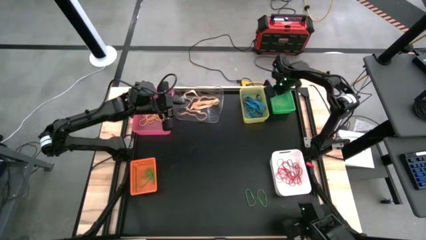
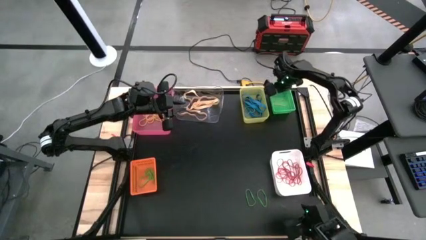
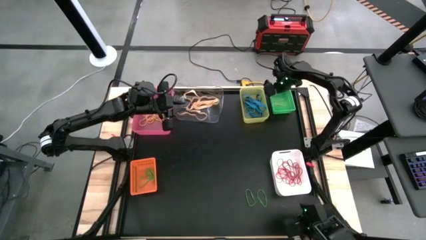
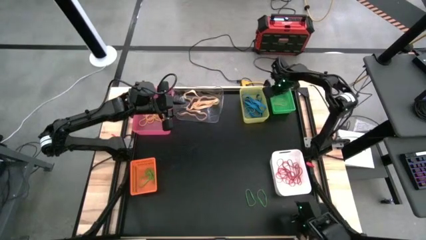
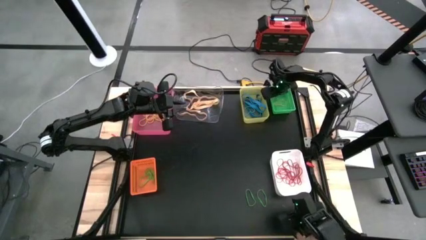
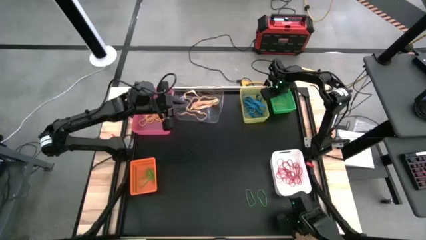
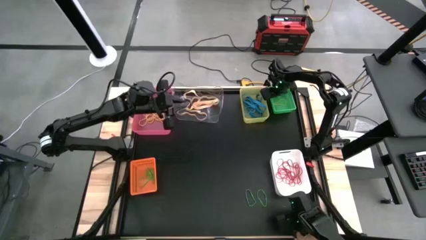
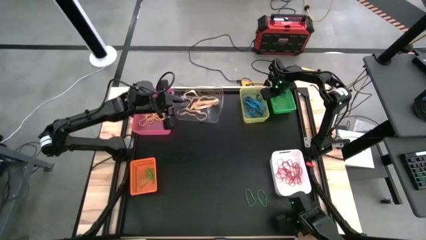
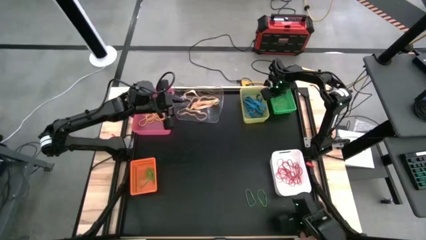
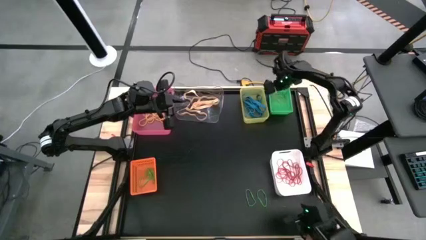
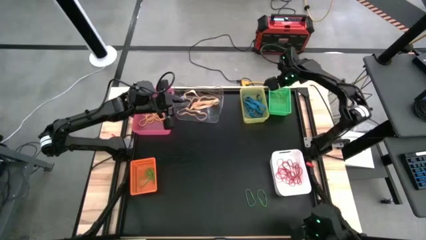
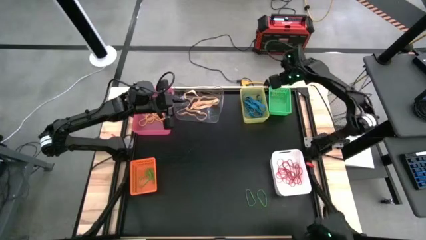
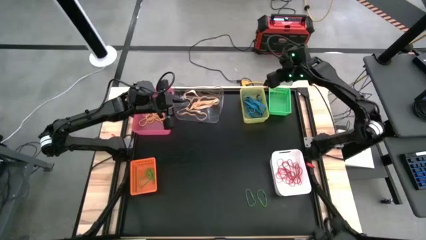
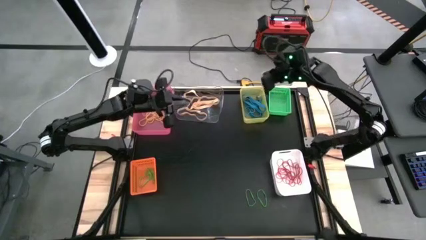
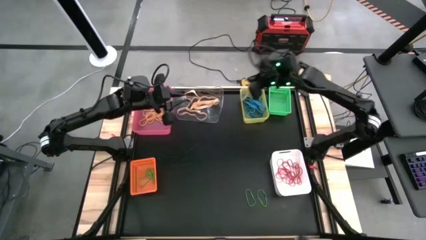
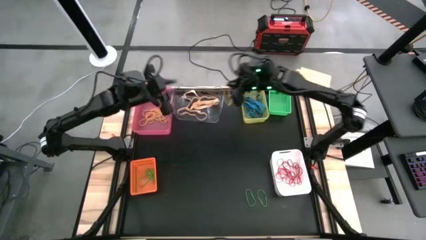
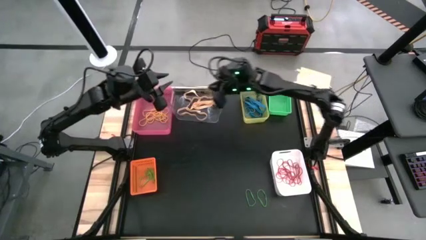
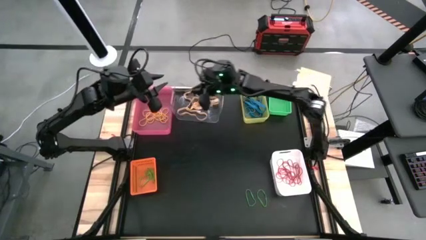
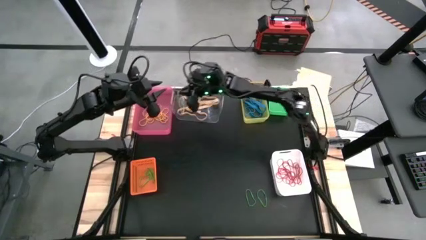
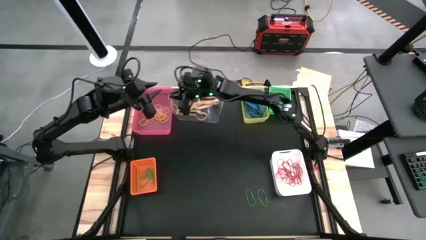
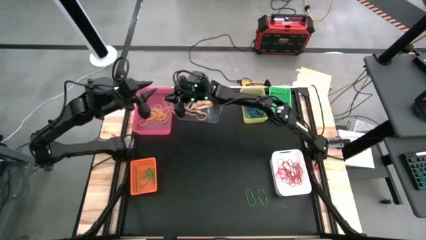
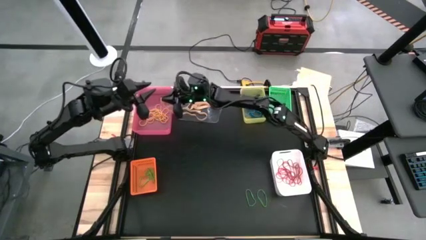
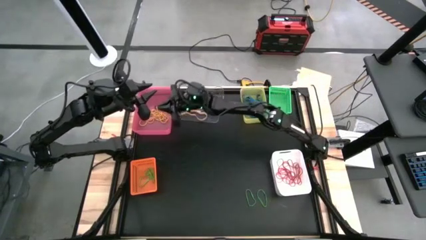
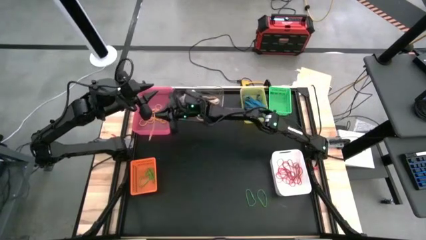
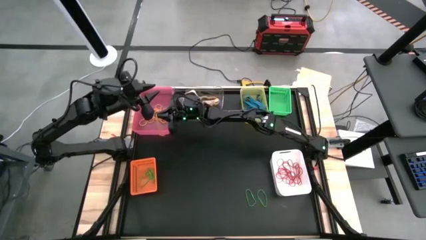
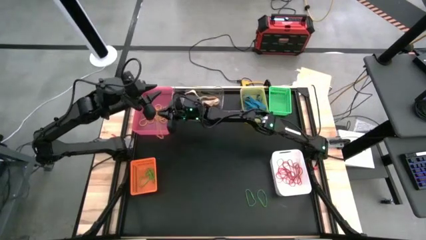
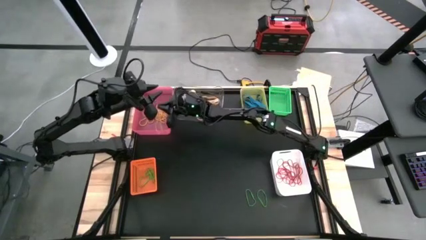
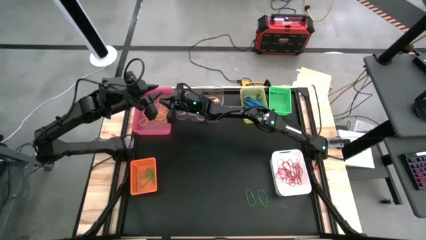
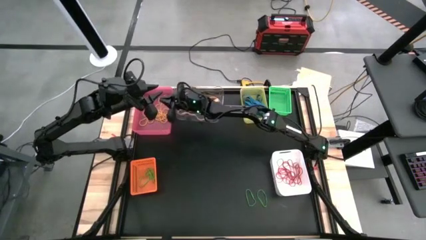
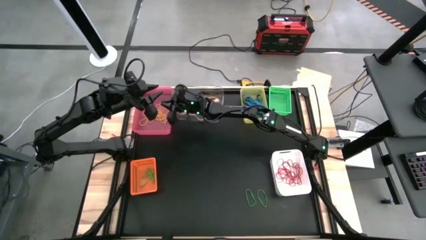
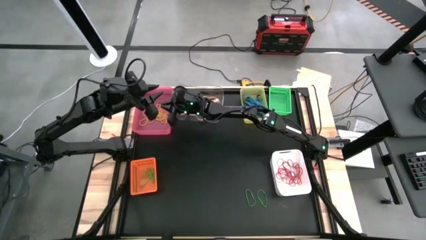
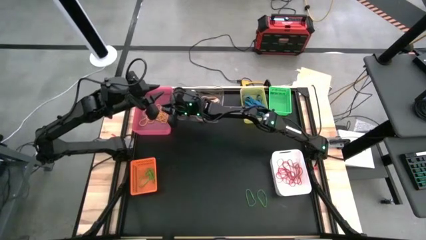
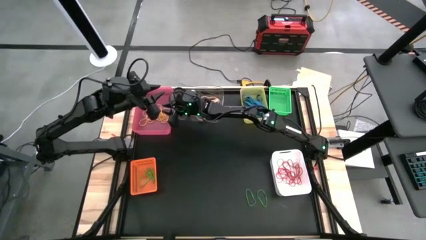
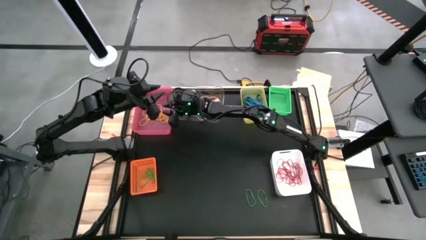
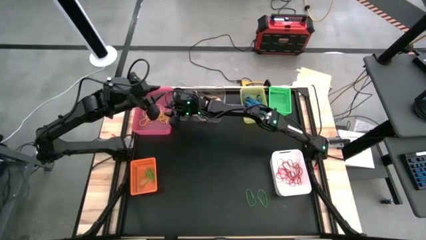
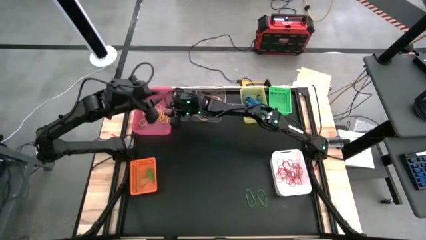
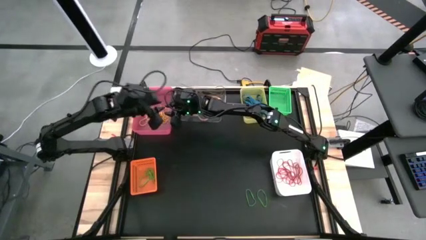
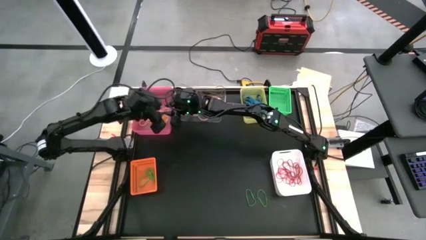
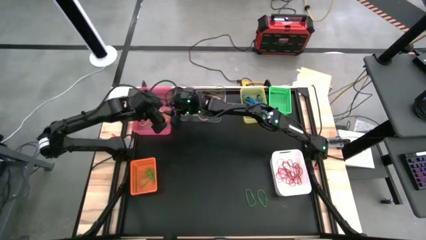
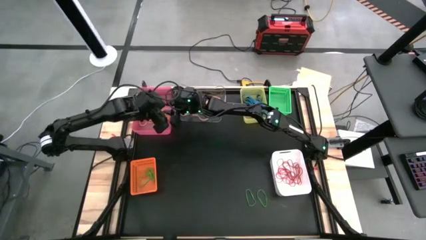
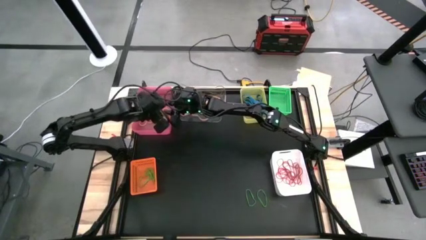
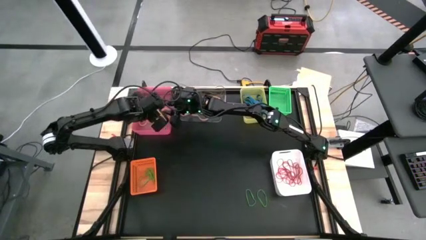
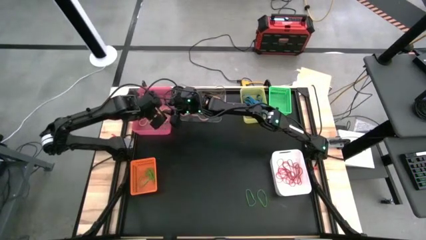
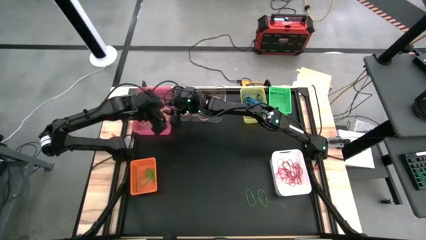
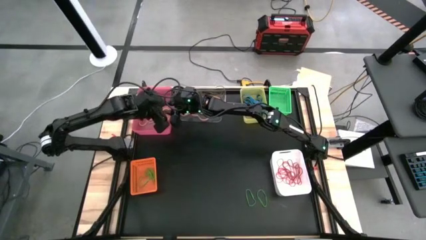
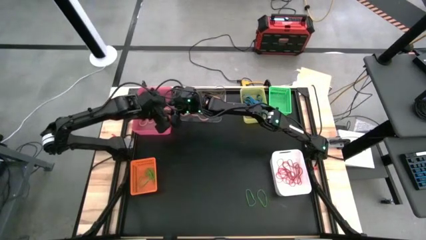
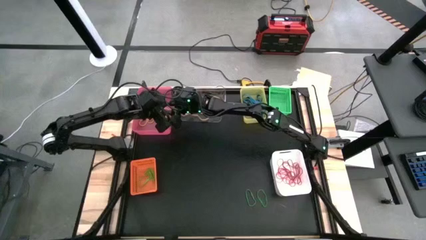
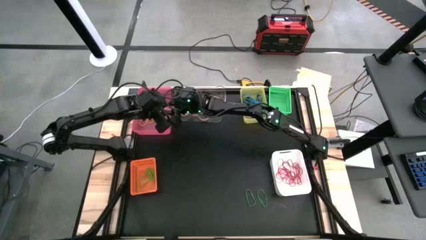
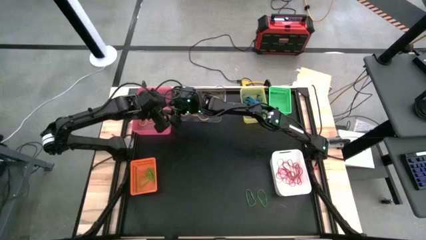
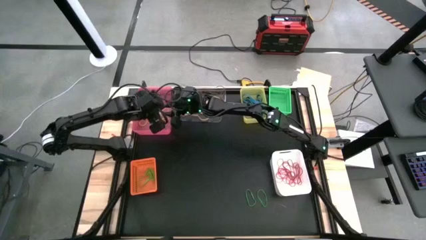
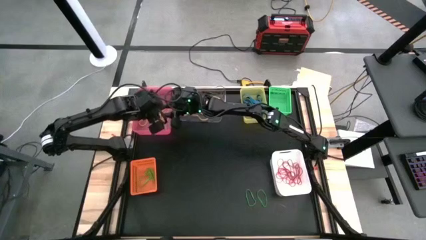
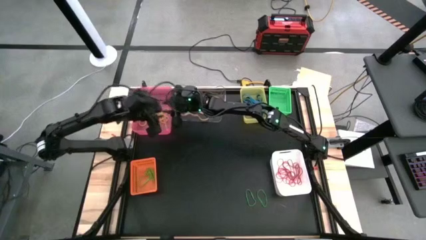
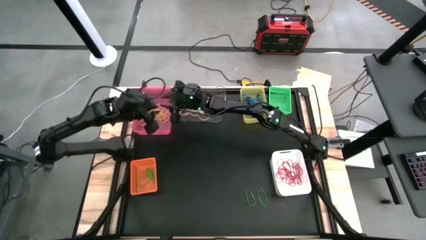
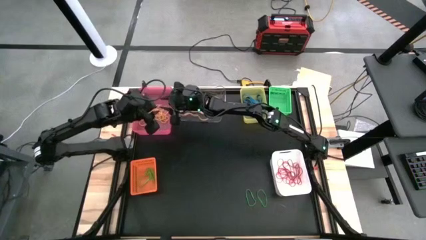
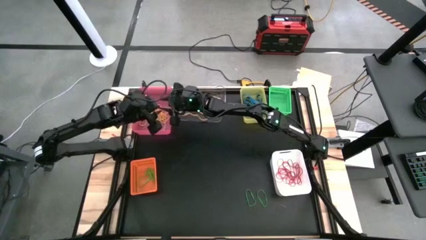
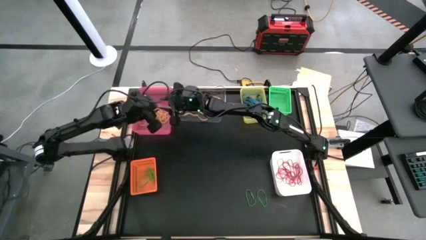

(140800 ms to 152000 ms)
Task: Sort rubber bands into baskets
Put the yellow rubber band from the green bin to the pink bin

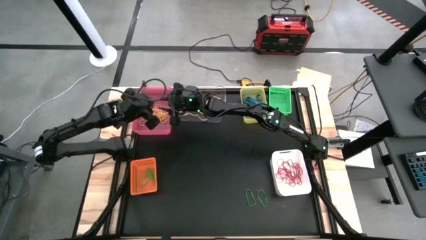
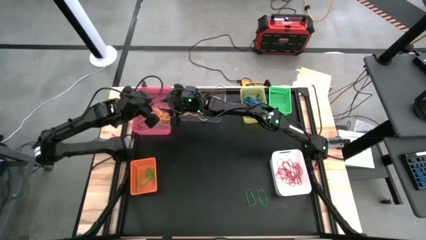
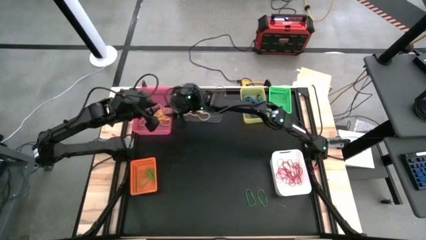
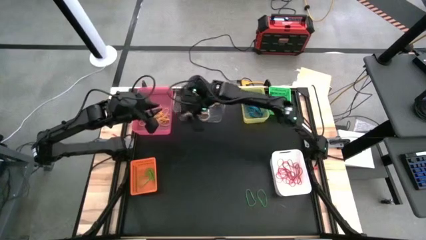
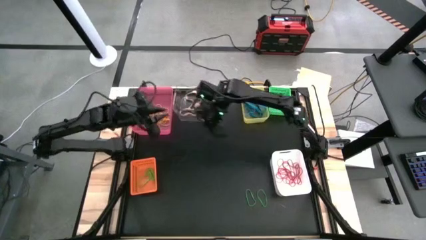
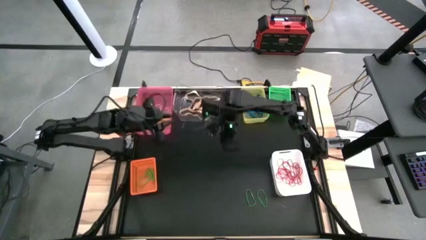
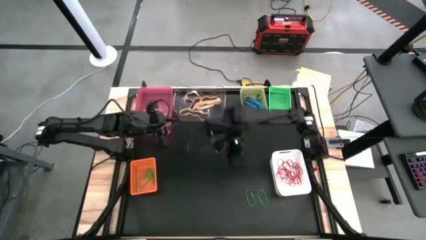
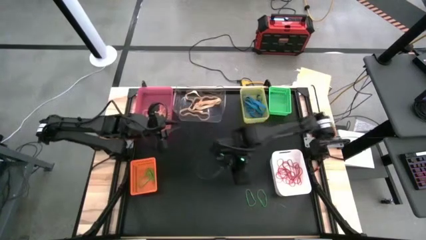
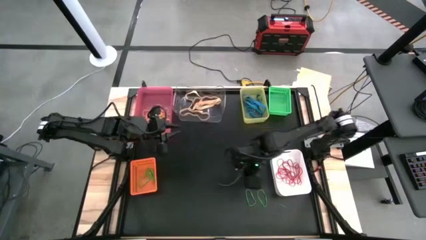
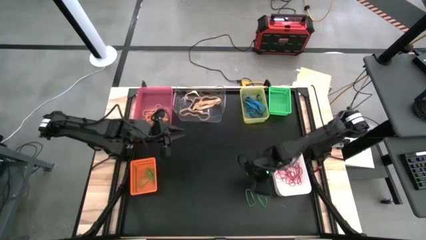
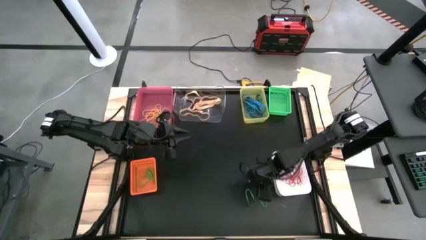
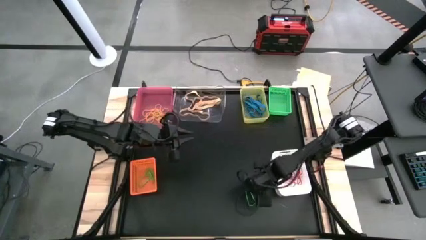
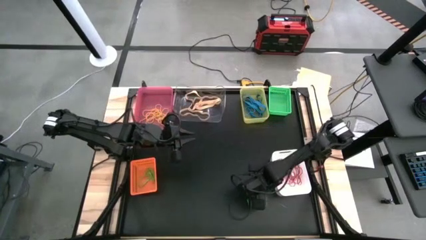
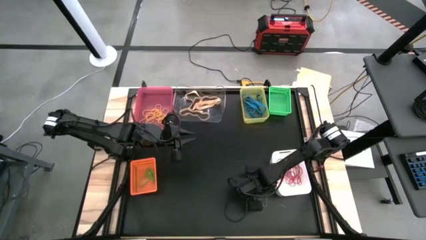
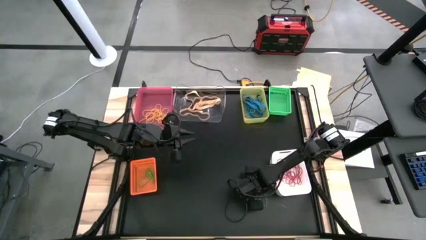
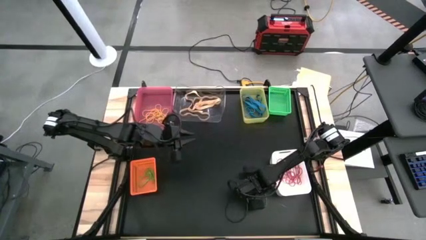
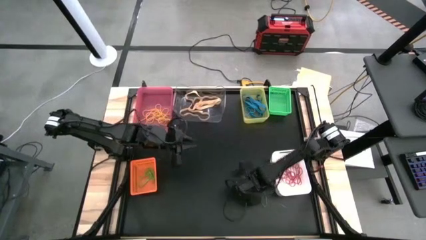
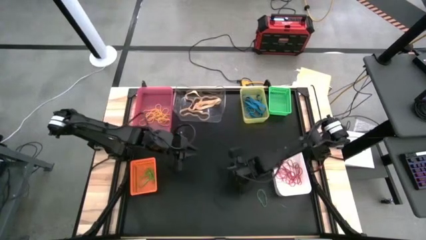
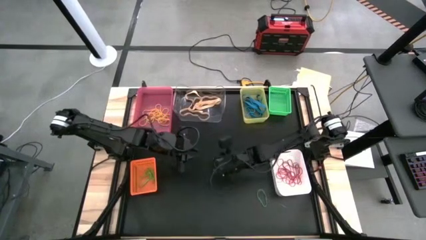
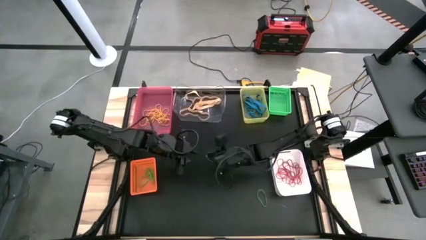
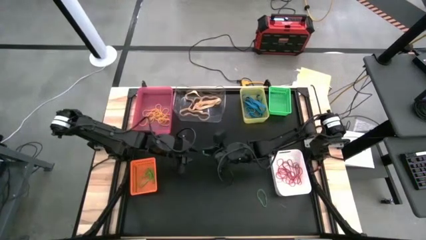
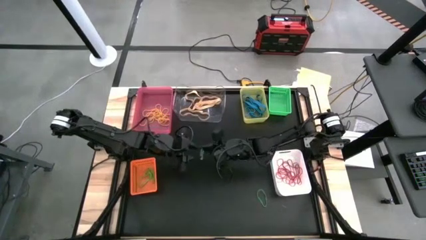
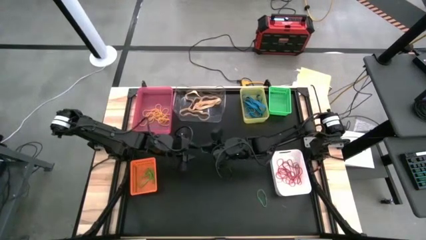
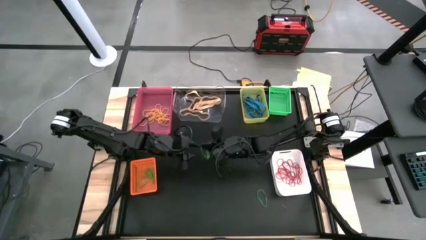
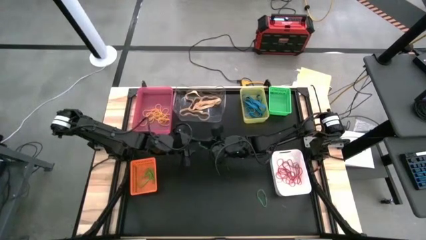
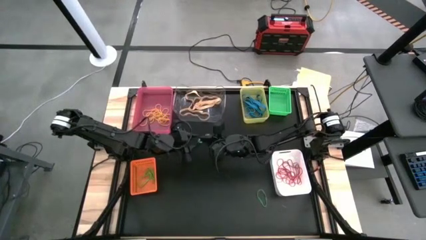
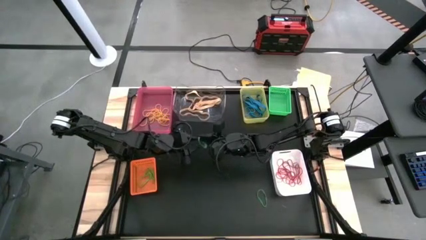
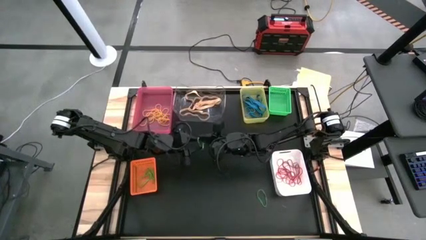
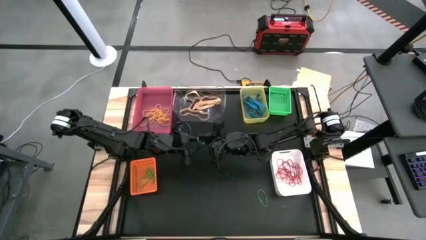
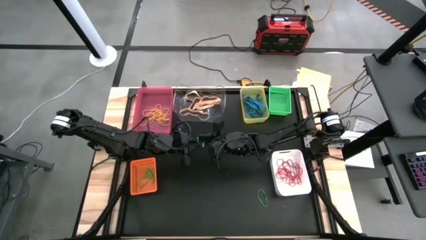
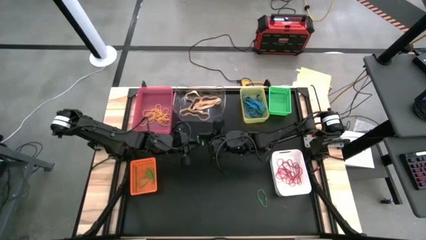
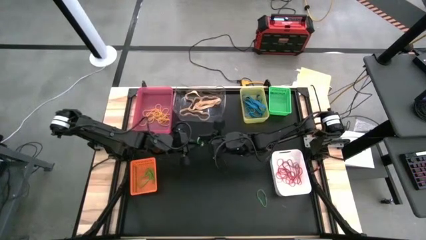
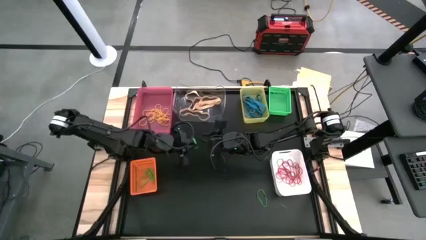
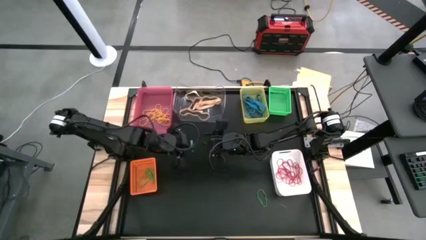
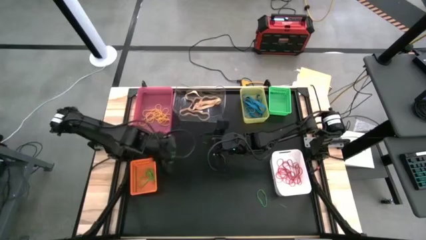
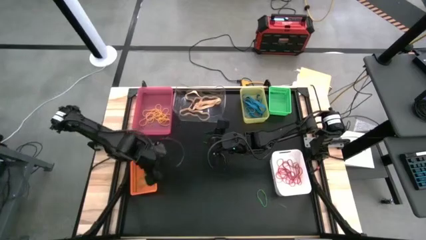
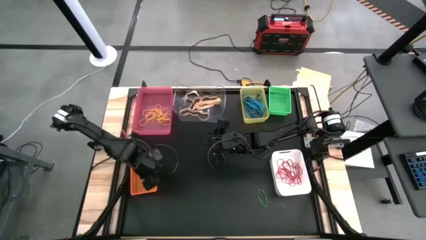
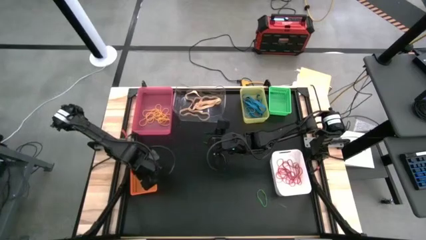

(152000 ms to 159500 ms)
Put the green rubber band into the orange bin
